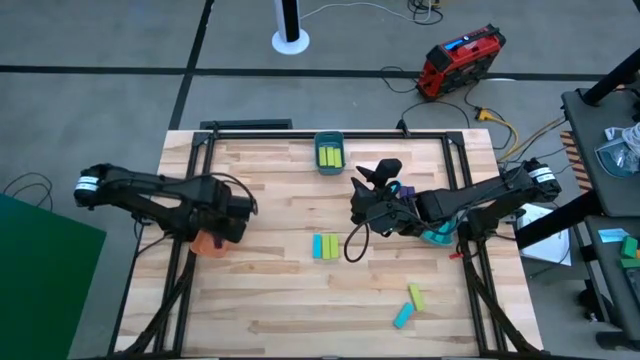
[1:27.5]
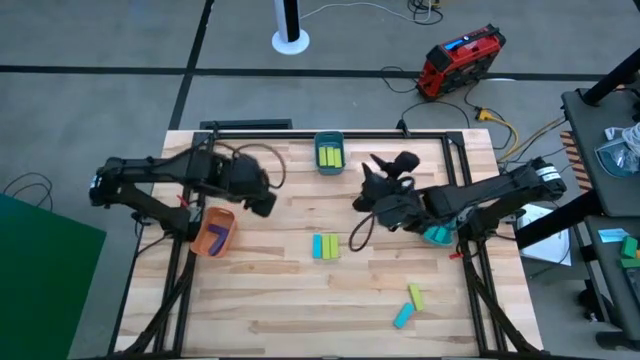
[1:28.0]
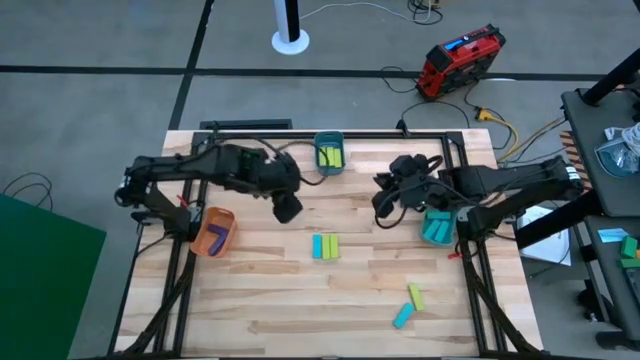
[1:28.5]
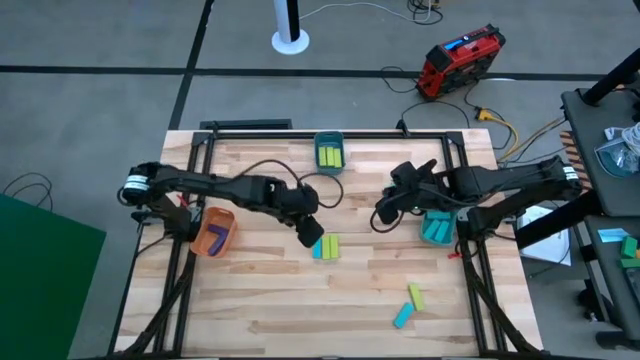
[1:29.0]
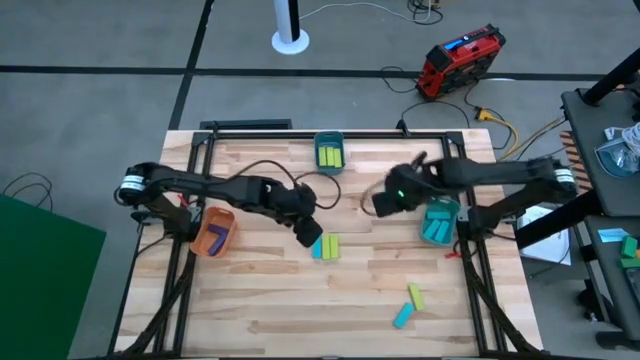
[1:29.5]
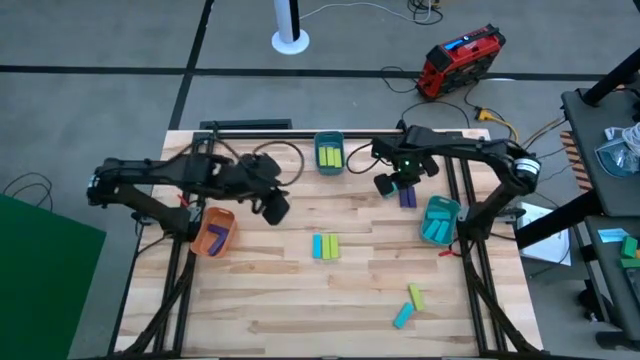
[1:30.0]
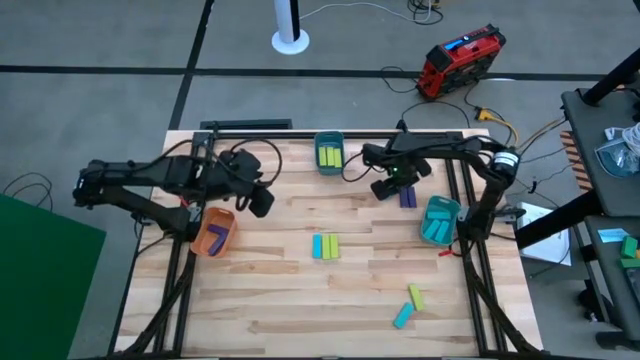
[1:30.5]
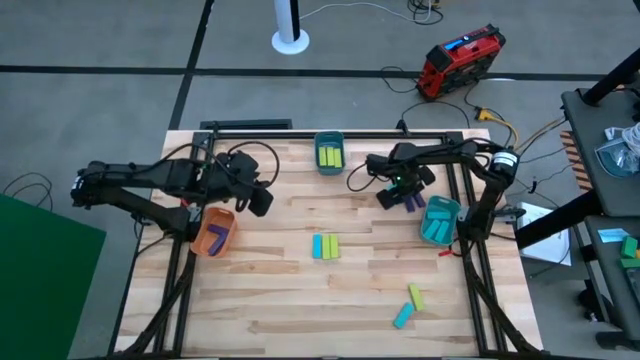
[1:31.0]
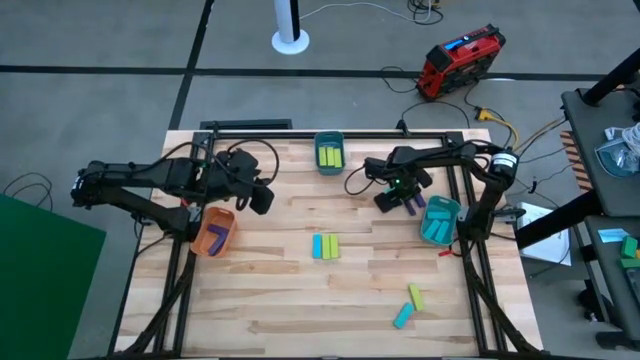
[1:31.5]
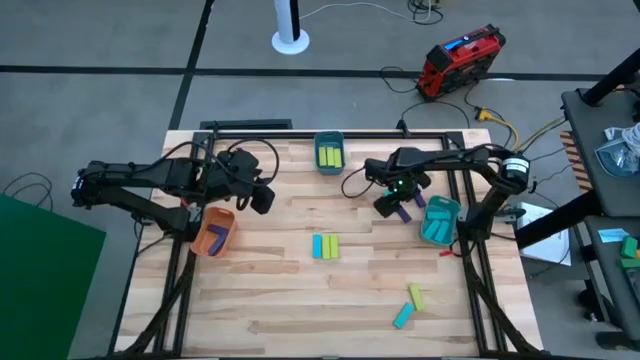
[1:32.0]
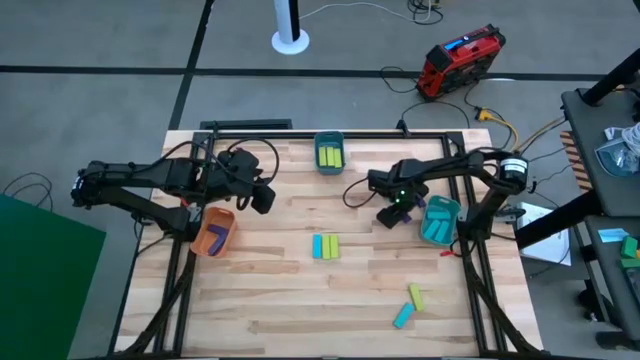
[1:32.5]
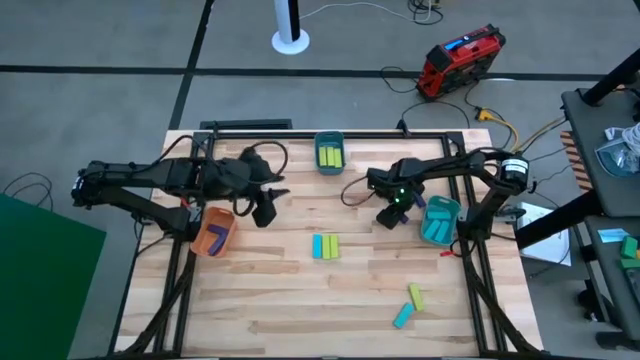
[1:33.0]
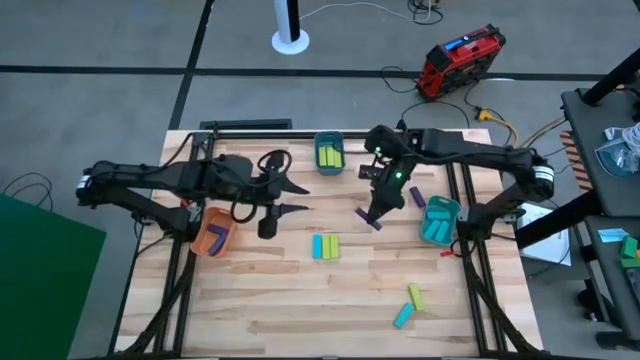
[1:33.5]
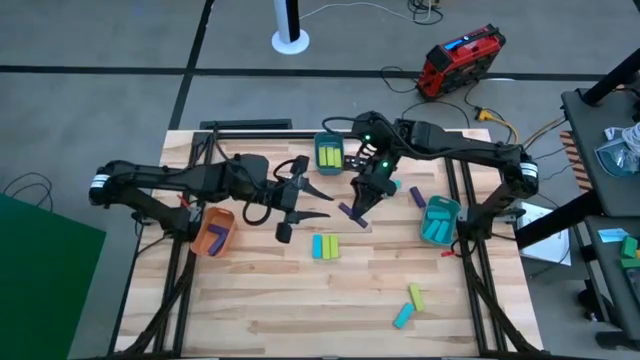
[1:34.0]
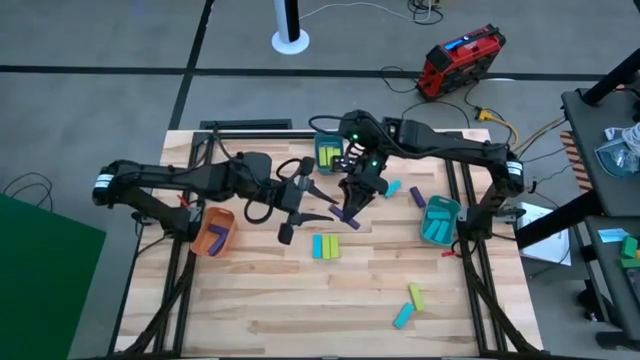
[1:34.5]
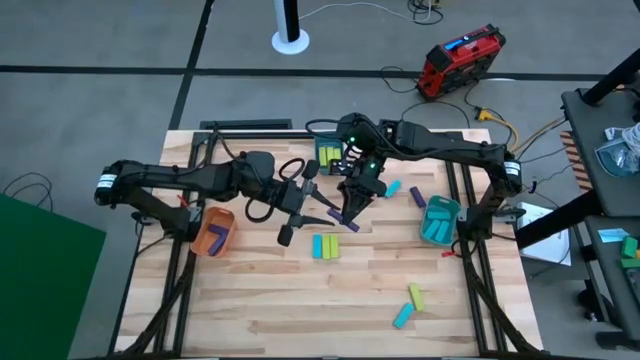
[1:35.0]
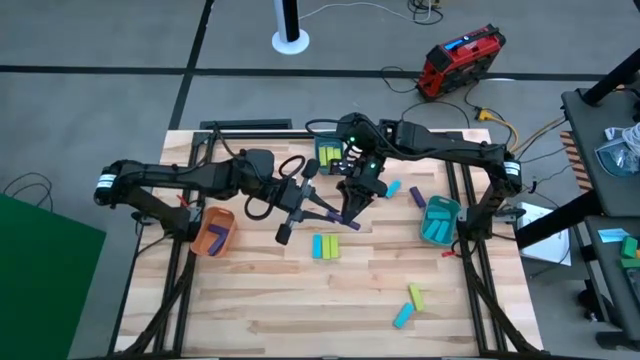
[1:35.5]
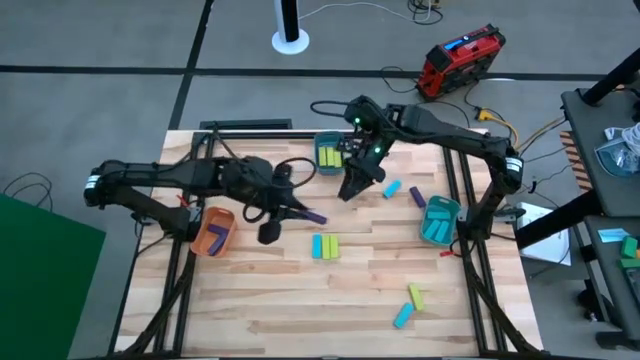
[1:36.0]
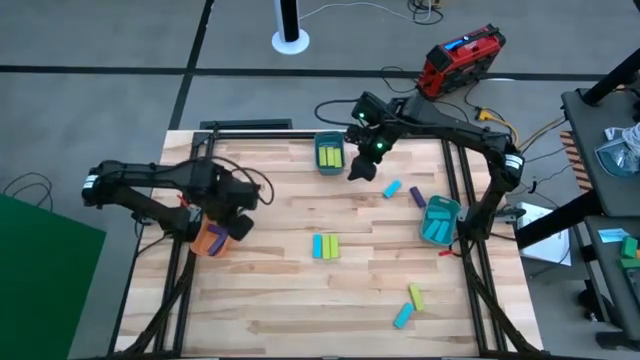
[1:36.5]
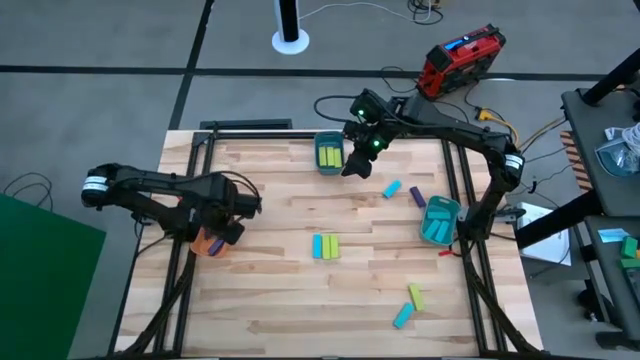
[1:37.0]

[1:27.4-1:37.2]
Task: Sort blocks
Put the violet block into the orange bin

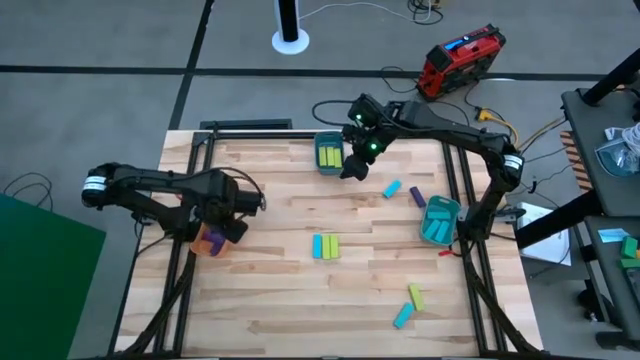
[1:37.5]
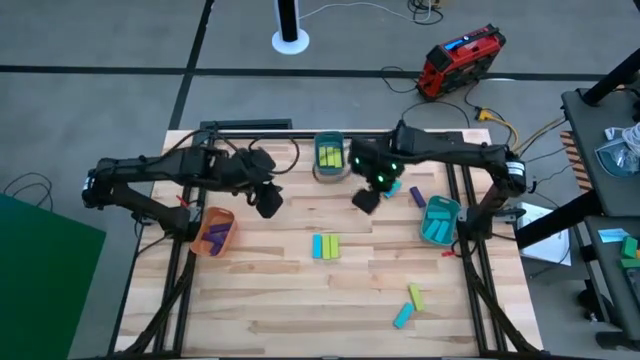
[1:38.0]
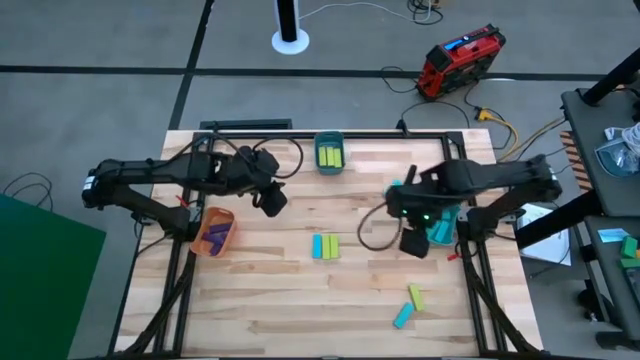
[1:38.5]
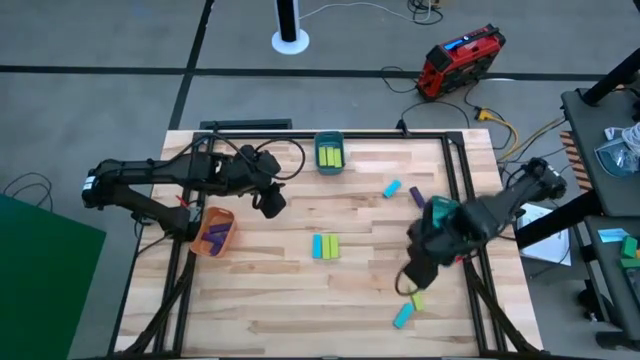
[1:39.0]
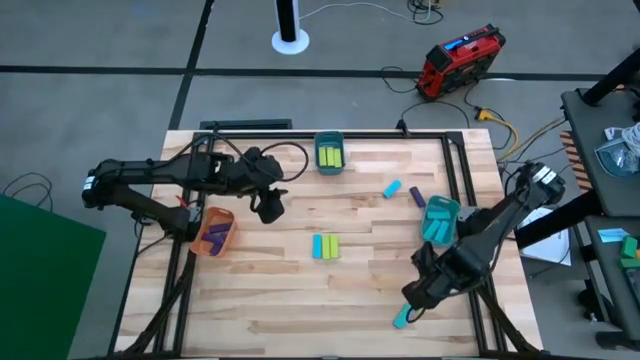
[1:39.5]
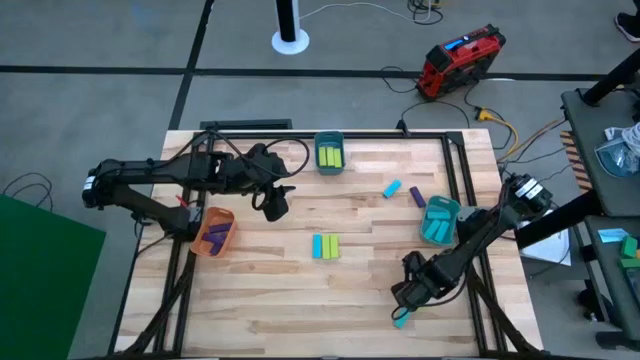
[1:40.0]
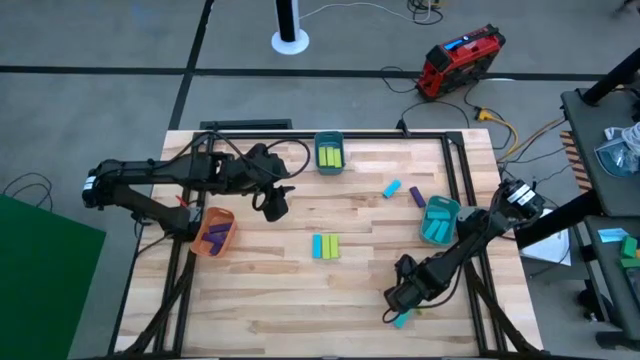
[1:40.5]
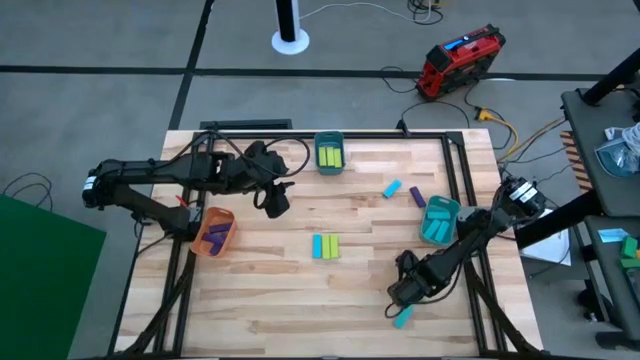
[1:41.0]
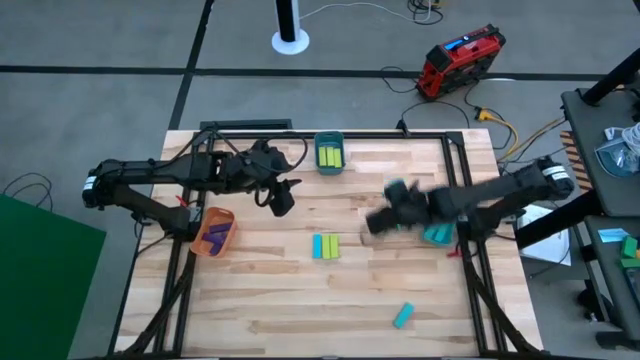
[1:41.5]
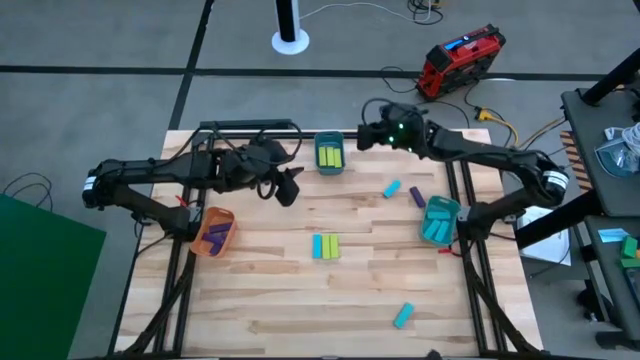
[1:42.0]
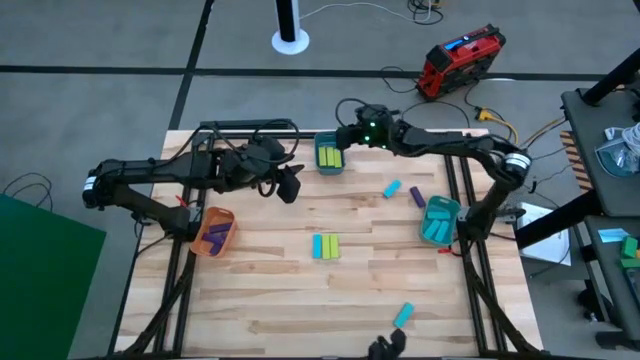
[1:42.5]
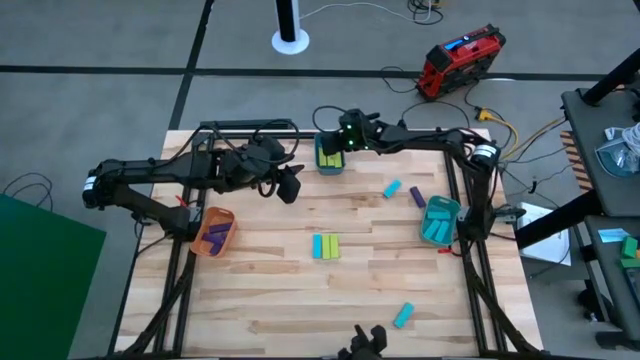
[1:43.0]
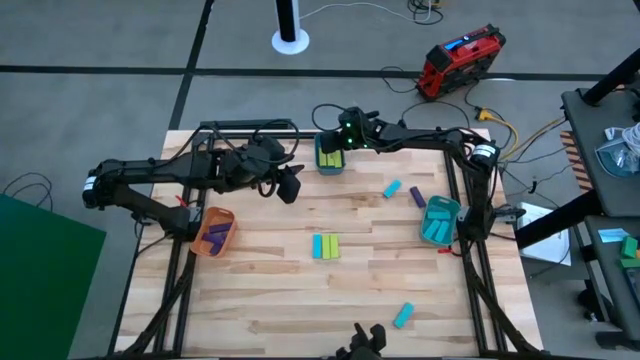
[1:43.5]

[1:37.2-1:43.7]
Put the green block into the blue bin

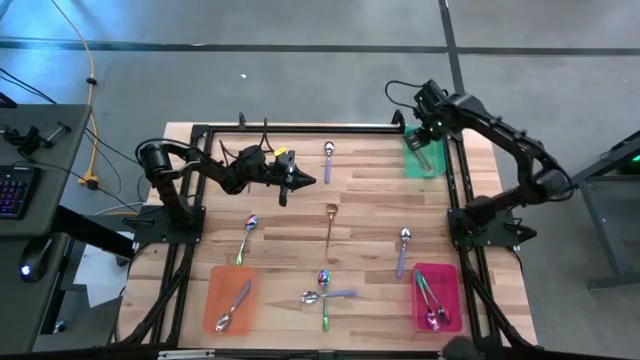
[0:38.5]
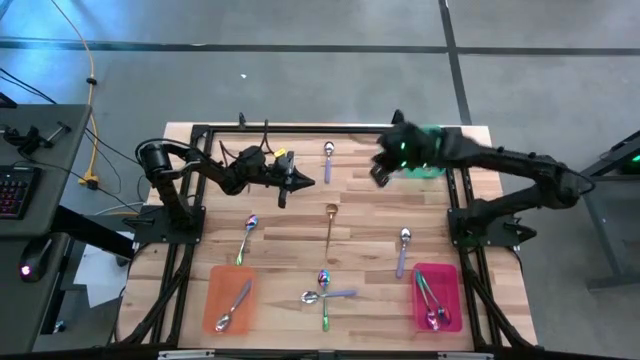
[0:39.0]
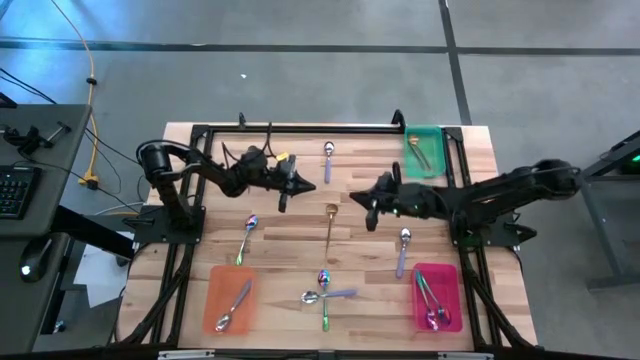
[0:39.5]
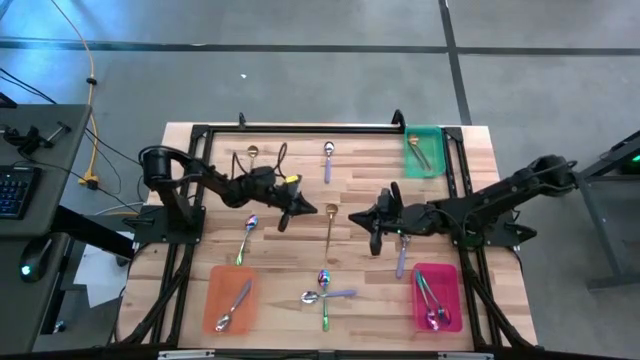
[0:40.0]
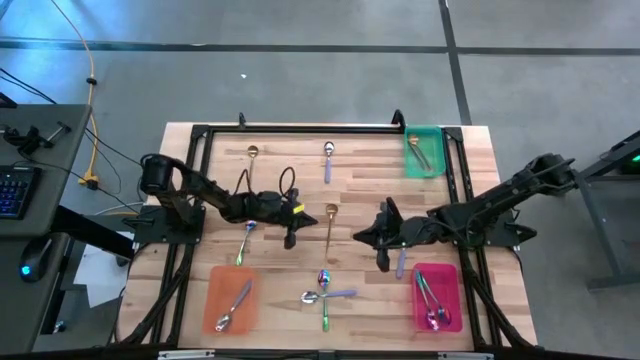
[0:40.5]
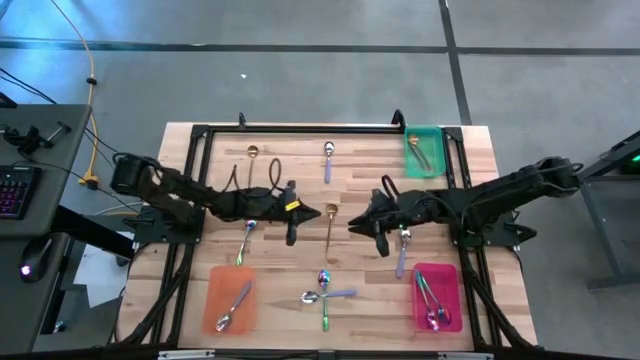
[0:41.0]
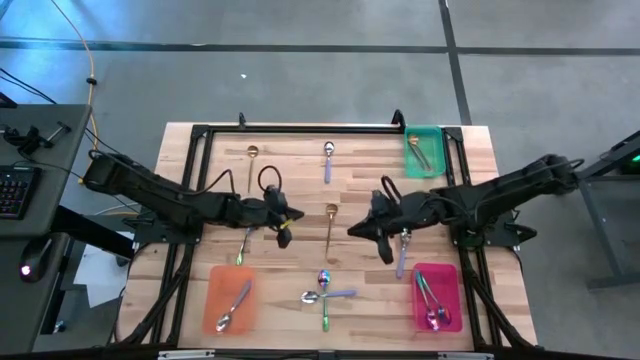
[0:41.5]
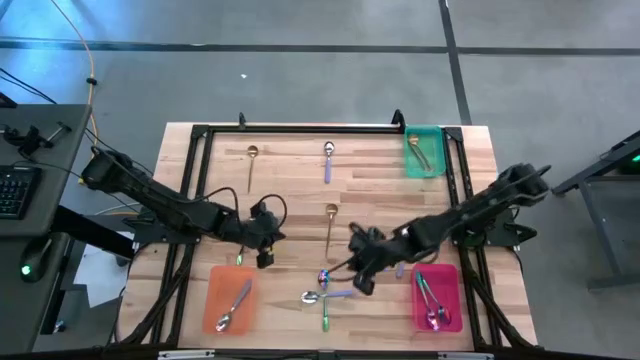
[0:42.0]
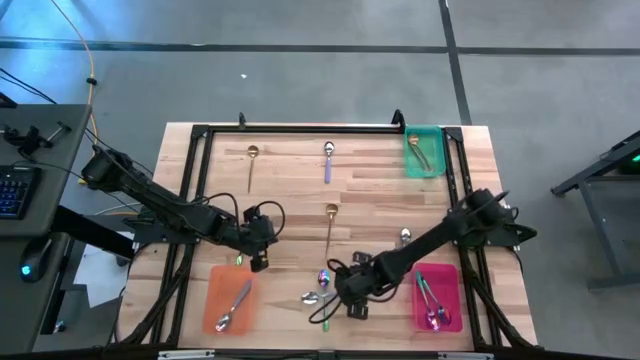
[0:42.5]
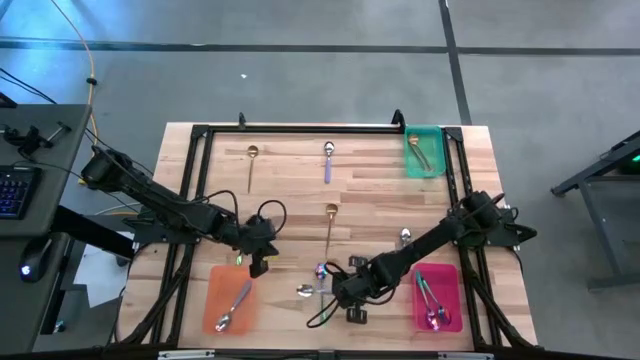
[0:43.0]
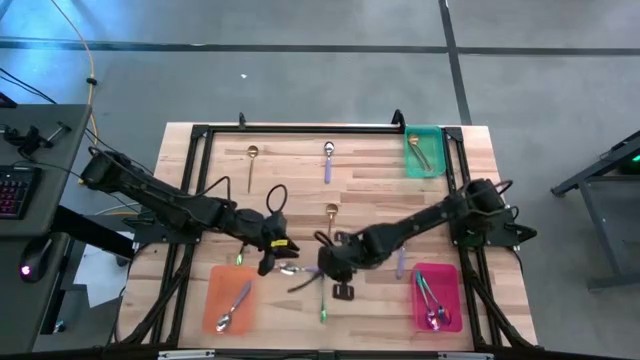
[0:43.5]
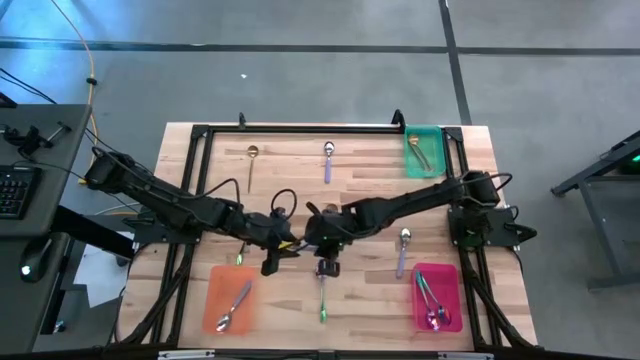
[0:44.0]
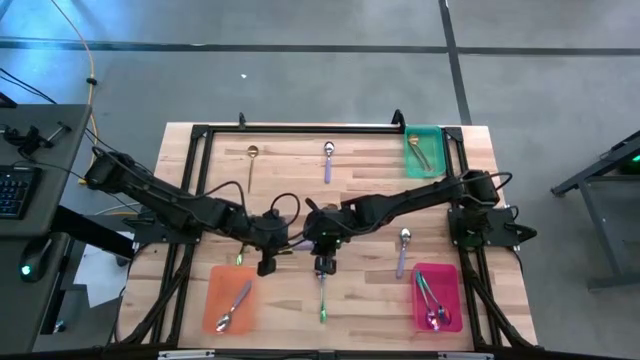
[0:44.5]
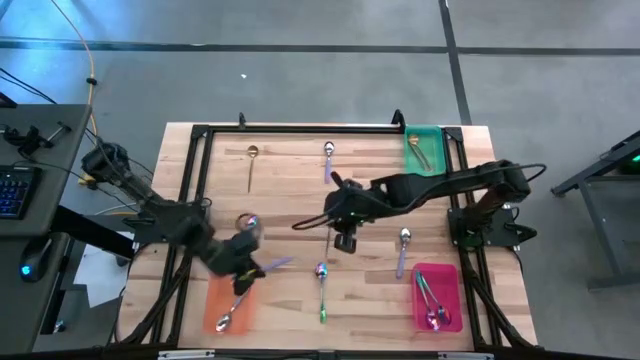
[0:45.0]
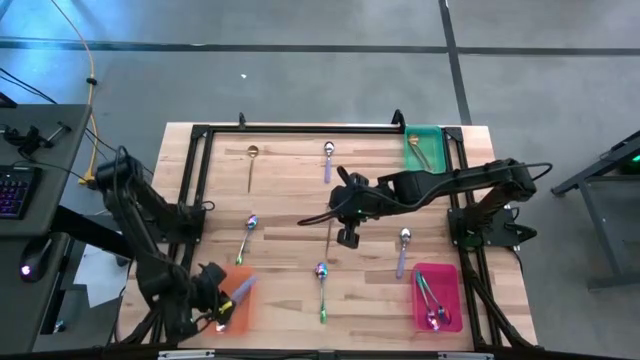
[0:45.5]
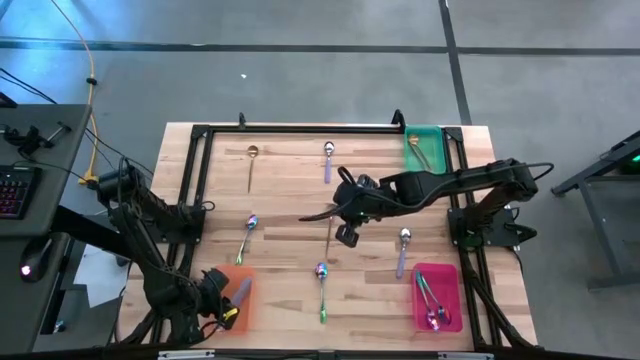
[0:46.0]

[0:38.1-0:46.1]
Task: Sort silverware by color (type)
Put the purple spoon into the orange bin
